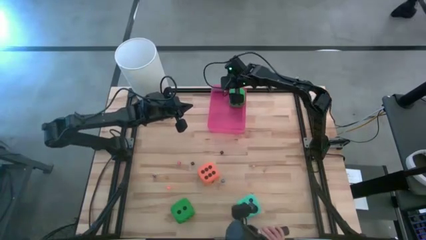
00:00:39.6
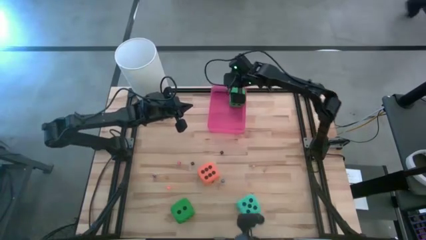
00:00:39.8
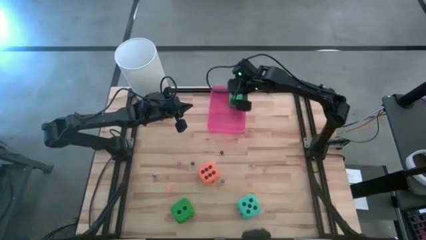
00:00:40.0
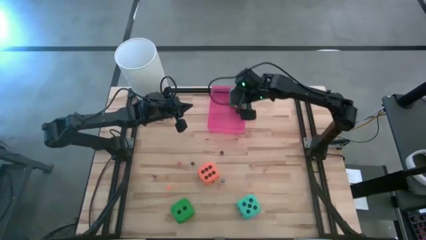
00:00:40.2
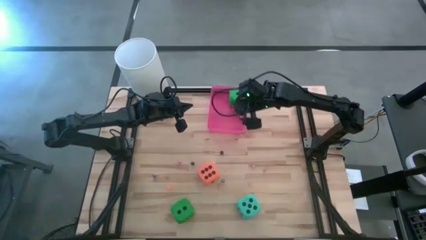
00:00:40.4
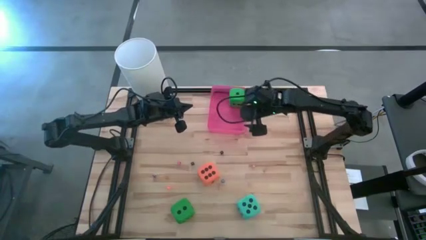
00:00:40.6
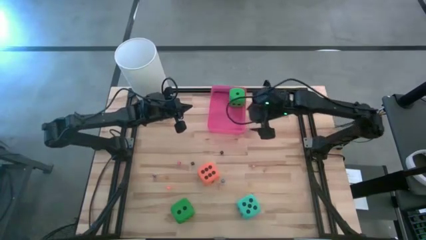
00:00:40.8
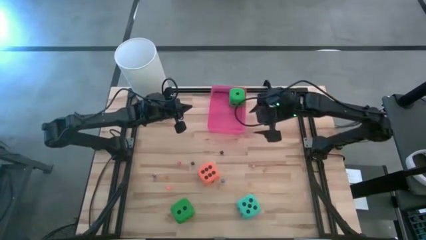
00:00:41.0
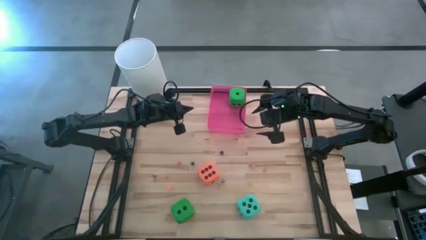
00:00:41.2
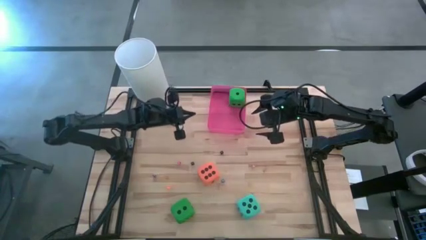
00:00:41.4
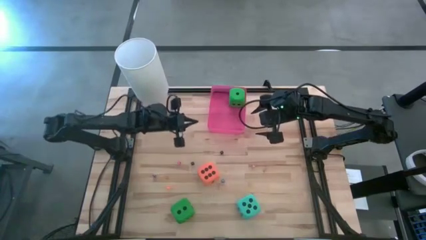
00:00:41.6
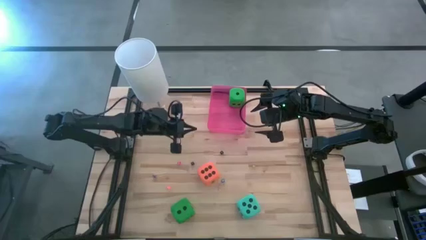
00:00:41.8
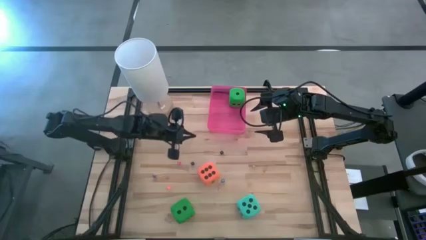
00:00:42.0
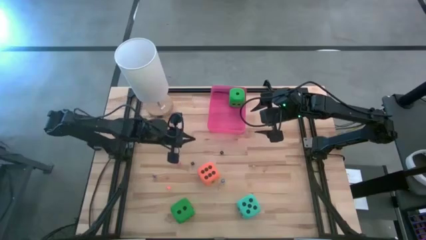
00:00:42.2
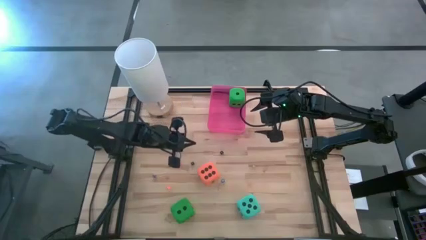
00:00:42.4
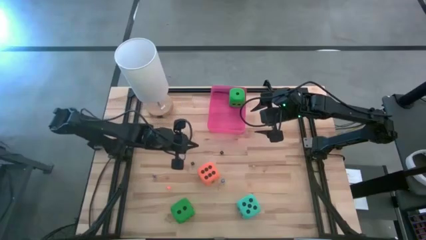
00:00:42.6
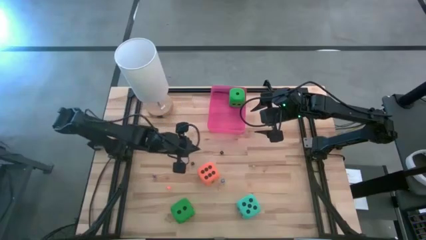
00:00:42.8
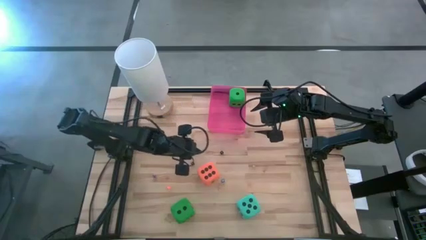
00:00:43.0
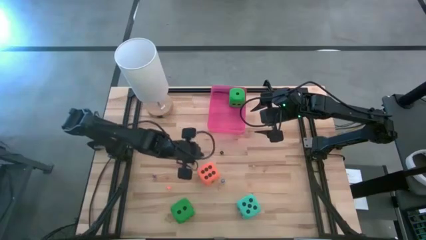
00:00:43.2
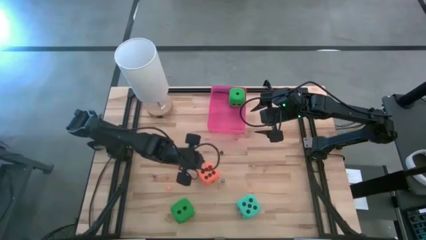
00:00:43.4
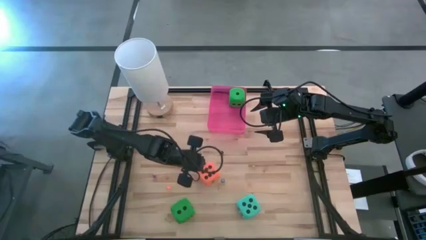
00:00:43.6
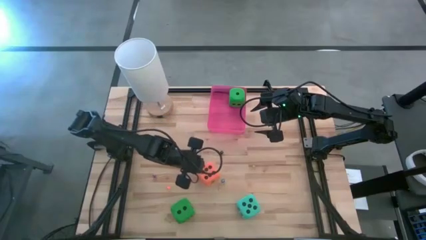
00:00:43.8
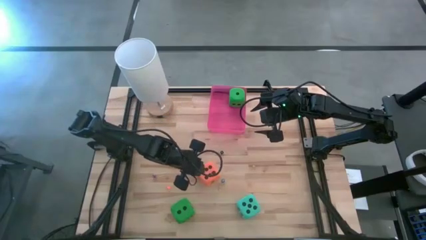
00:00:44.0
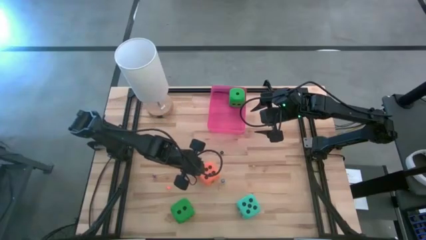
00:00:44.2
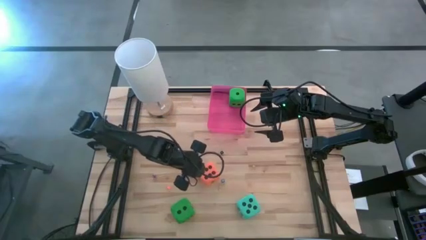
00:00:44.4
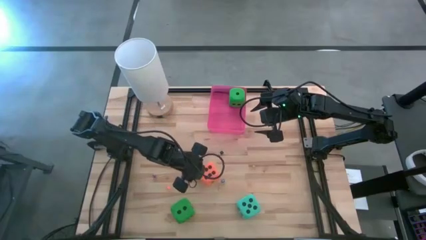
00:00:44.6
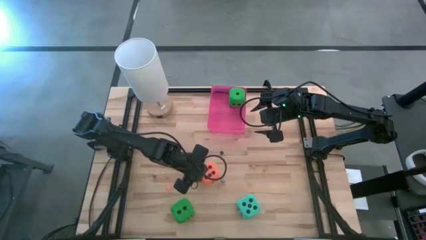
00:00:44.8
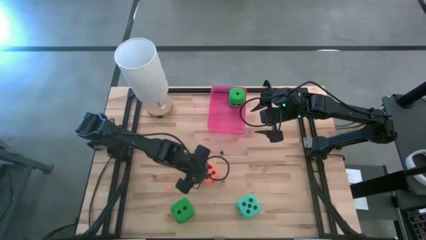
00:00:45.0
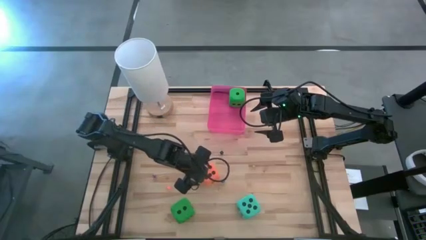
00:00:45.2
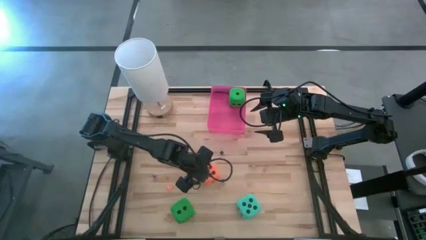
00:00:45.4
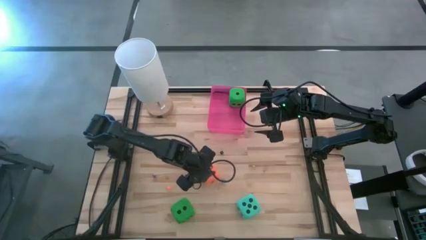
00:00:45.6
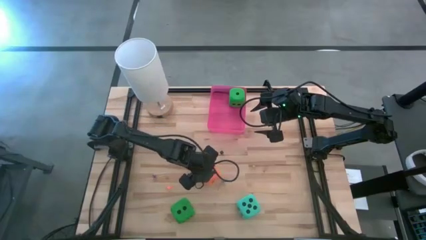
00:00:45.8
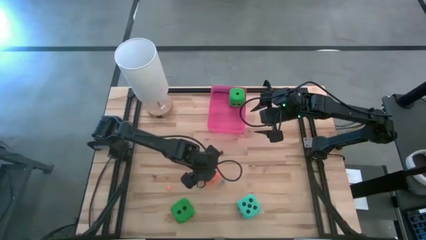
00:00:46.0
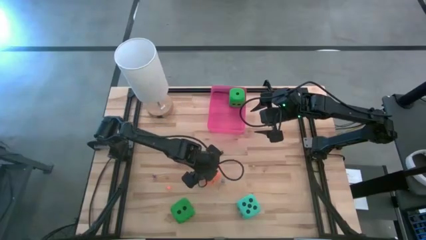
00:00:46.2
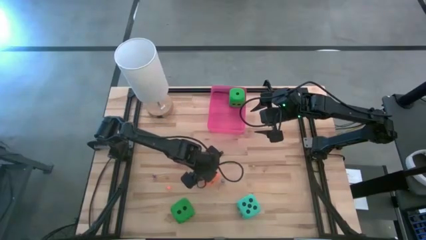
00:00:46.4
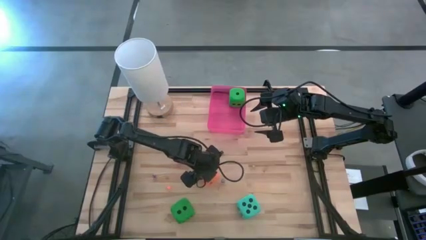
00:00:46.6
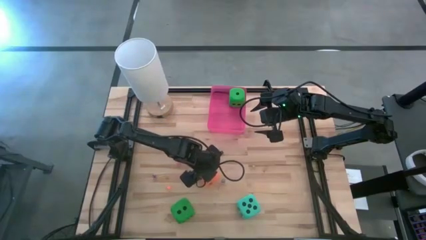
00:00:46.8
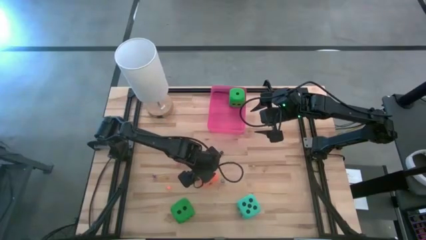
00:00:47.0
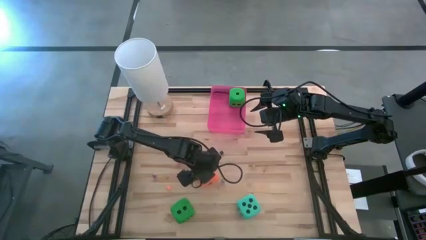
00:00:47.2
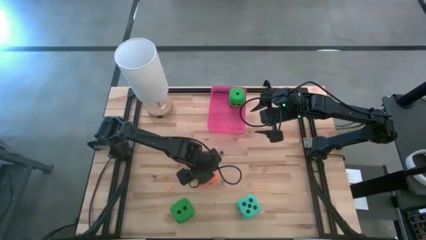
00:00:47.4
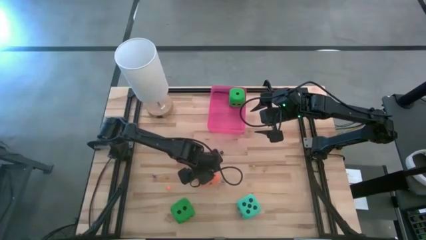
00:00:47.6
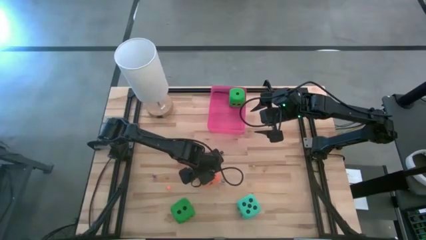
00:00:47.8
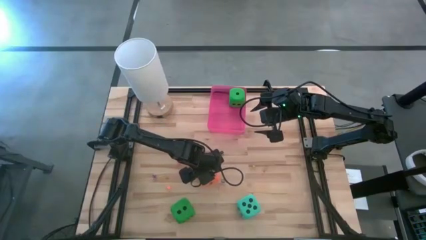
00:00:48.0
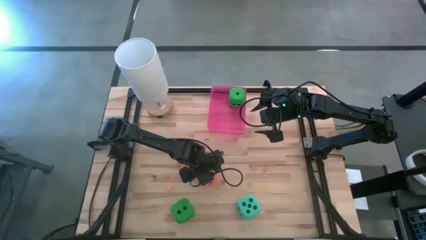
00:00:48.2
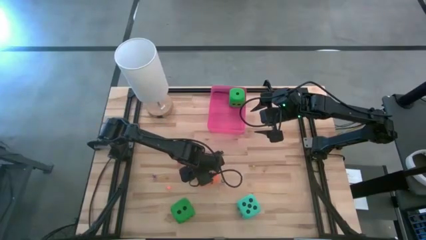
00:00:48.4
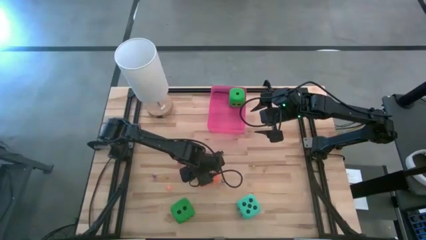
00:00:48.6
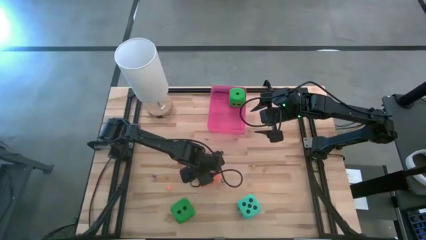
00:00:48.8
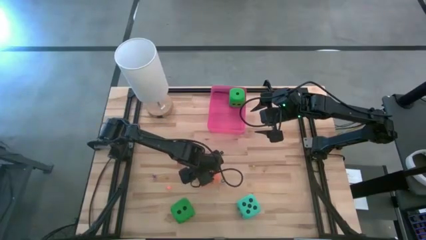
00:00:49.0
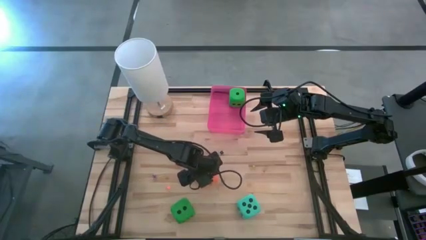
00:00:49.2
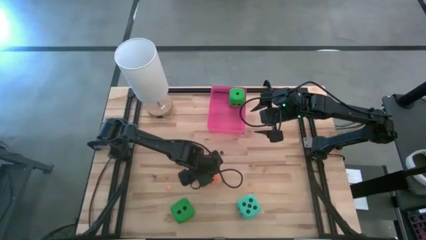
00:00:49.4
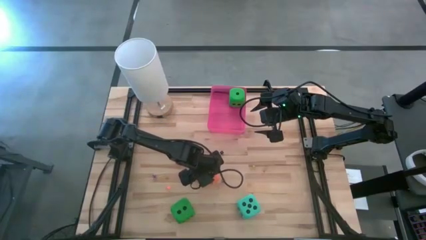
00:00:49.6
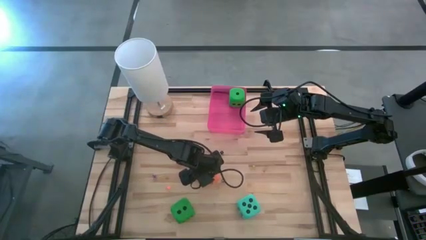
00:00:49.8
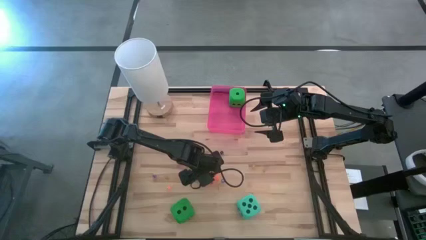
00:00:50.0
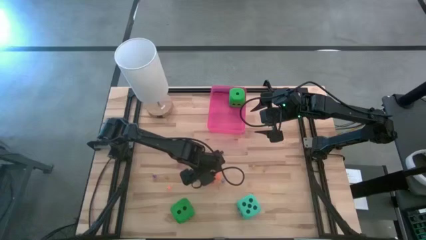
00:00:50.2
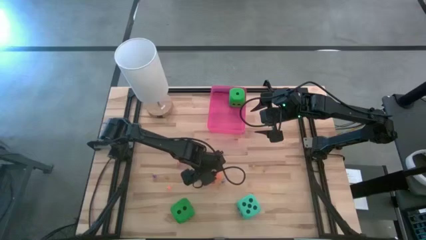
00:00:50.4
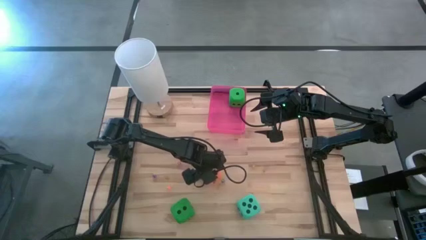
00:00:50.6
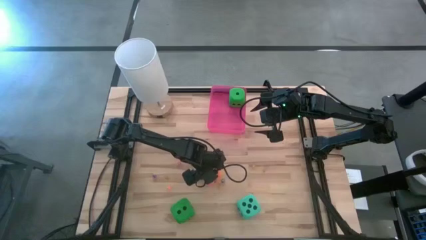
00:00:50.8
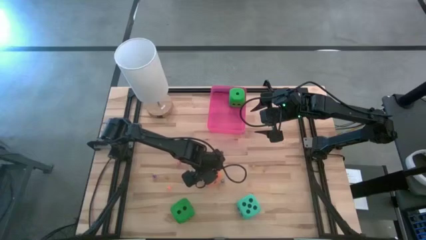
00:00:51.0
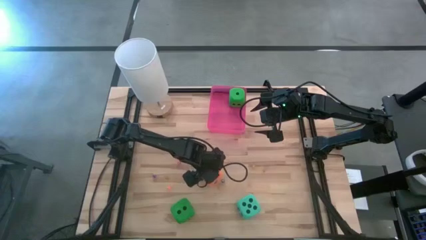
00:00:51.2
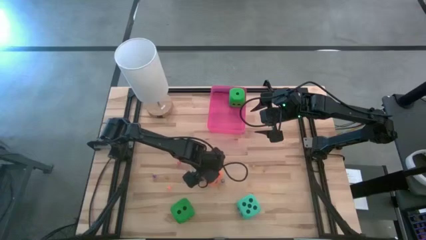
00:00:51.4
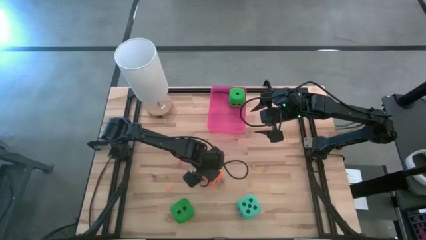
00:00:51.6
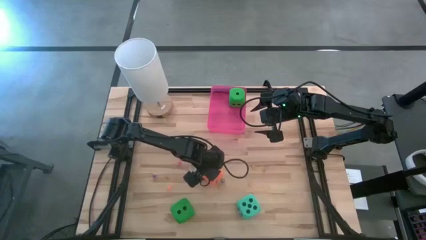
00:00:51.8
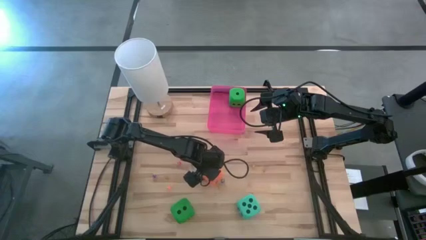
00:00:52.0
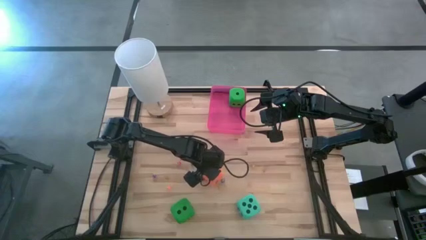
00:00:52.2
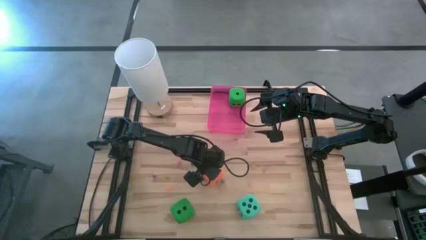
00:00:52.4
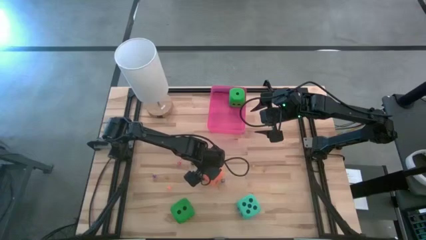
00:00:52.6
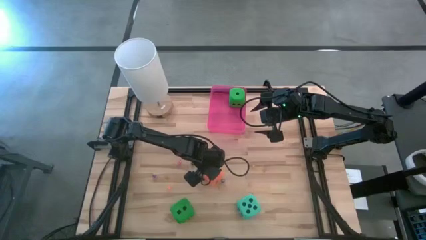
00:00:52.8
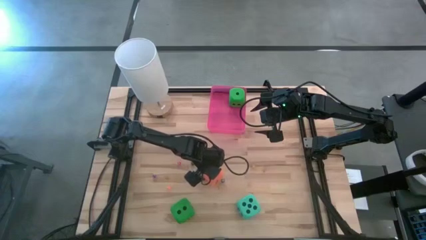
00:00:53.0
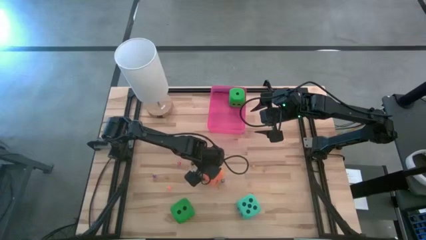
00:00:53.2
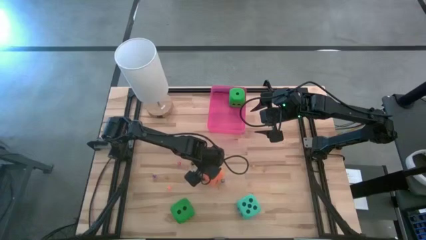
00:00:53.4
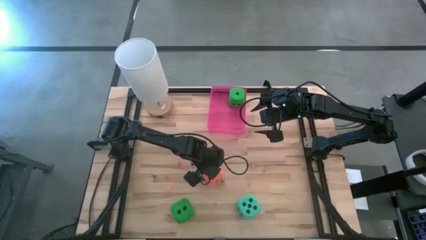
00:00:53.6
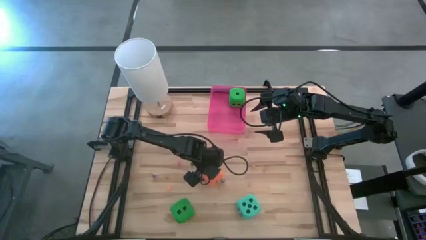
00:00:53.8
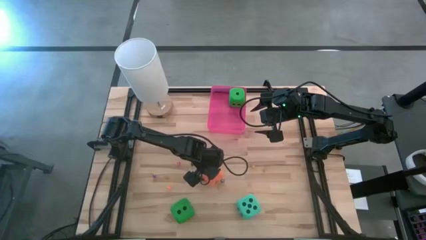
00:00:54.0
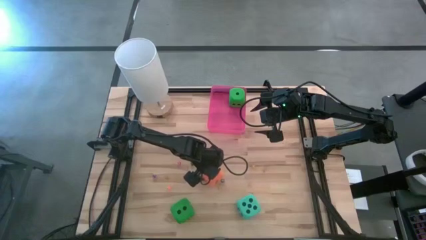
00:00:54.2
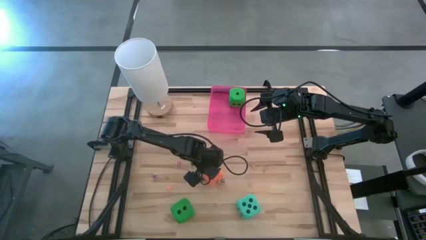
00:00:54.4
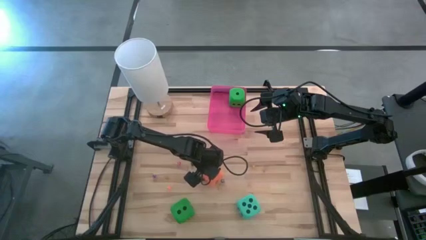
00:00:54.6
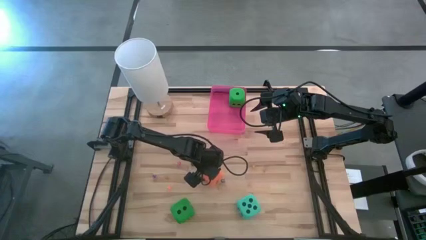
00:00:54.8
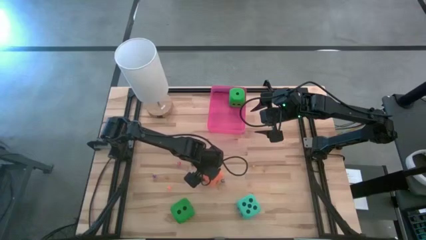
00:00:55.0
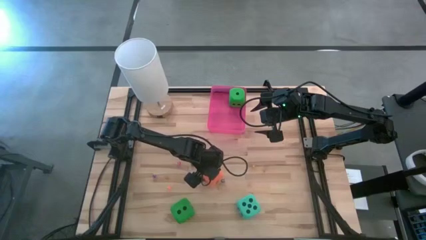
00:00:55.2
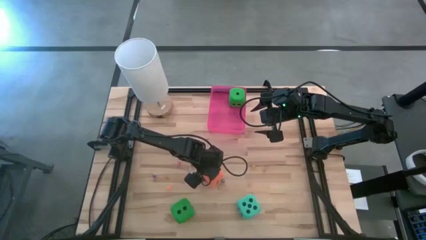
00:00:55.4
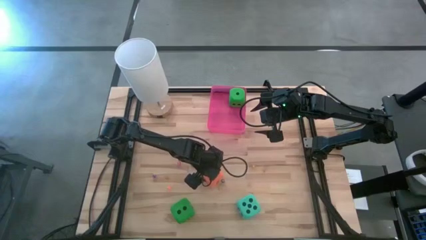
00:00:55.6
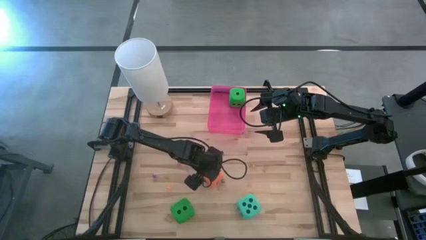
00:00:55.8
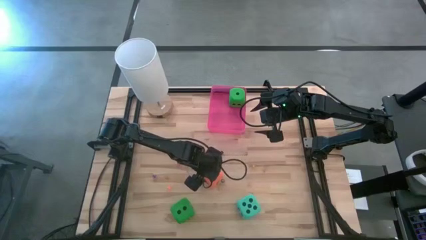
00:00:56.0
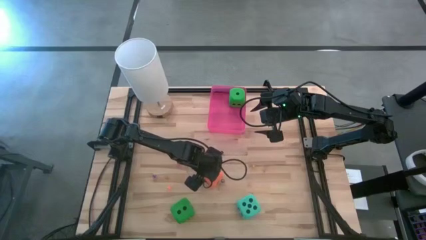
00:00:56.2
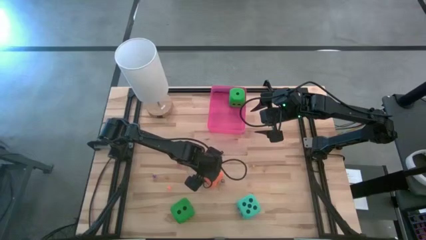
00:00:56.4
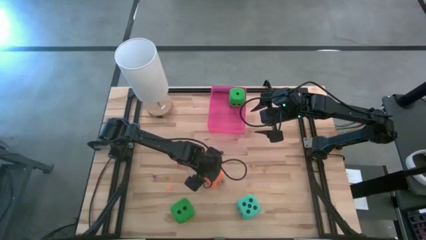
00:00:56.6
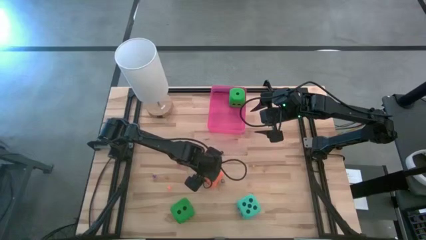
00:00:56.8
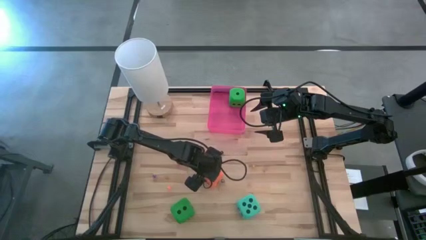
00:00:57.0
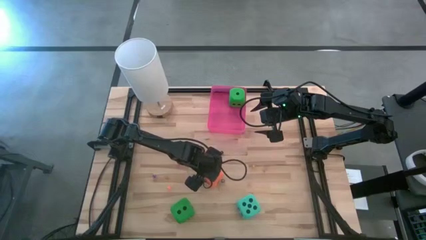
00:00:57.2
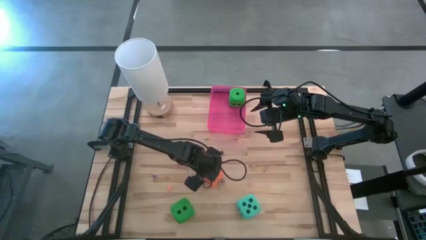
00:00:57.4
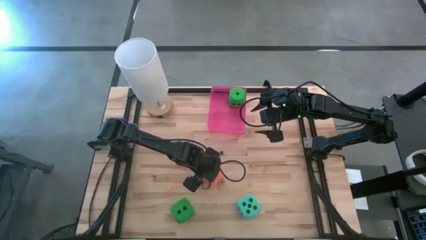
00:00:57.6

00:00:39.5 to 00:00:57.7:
Task: Pick & Place Dice
Put the big orange dice into the red container
